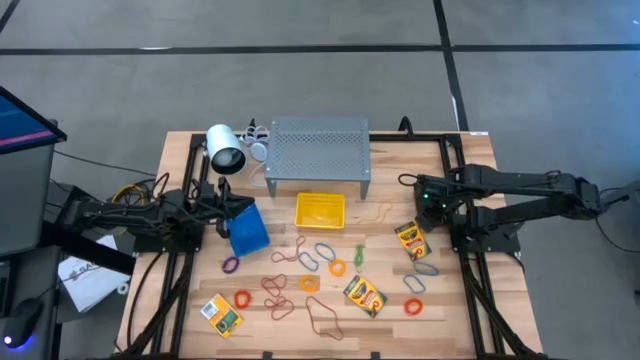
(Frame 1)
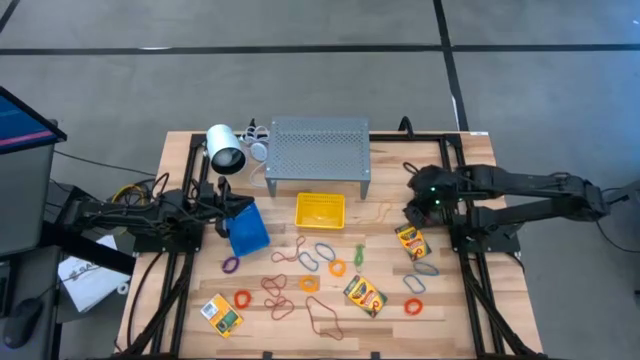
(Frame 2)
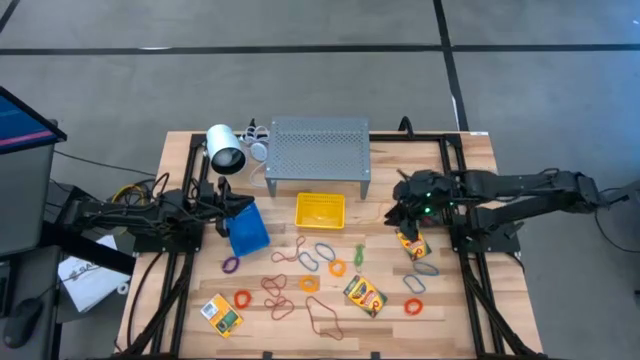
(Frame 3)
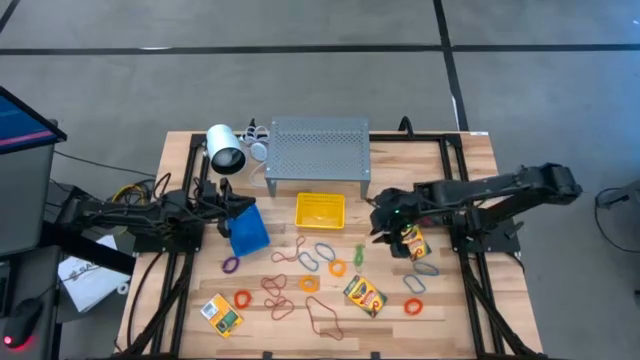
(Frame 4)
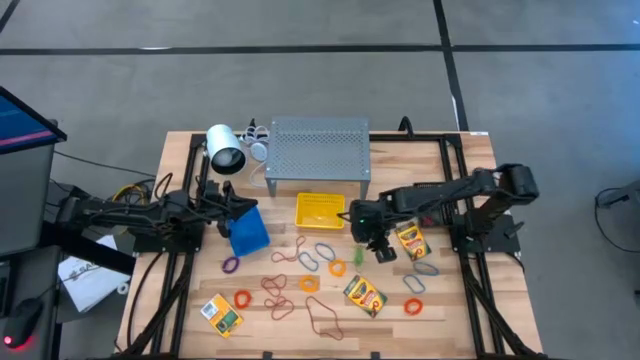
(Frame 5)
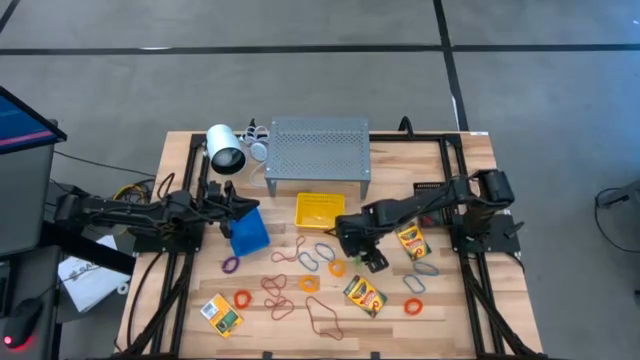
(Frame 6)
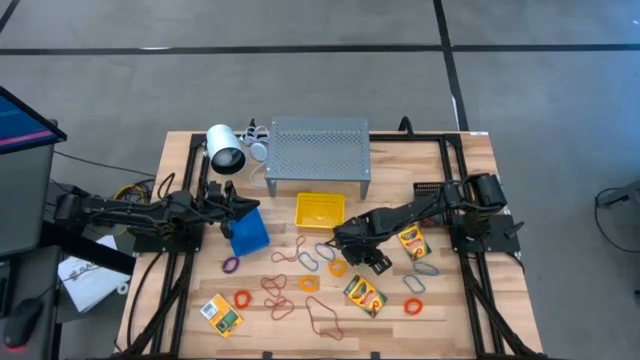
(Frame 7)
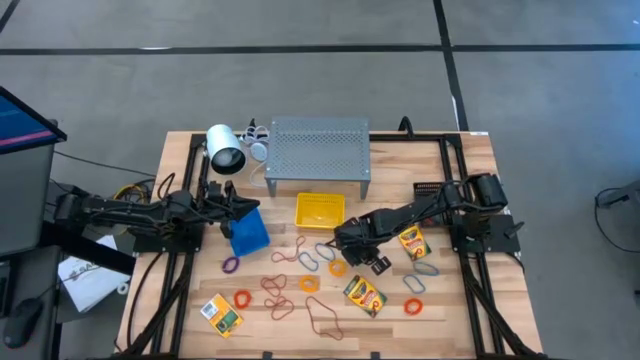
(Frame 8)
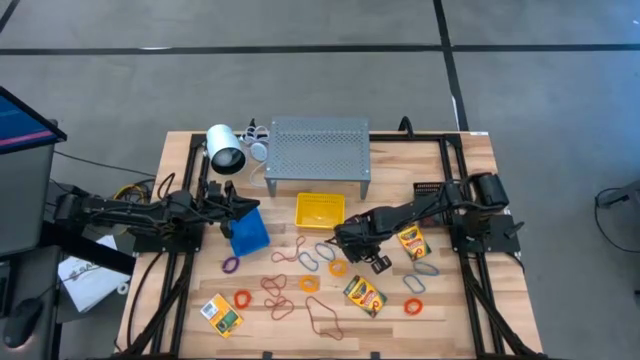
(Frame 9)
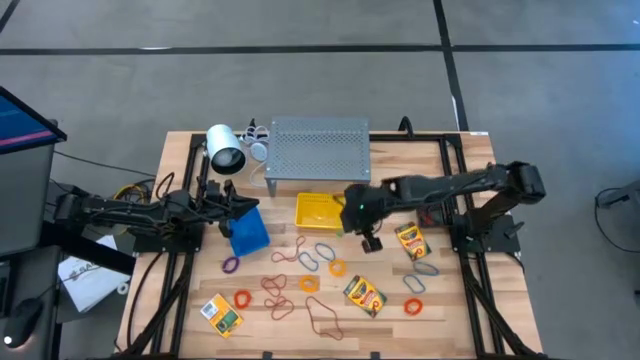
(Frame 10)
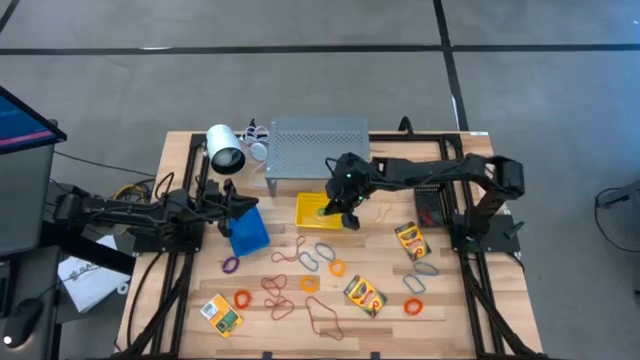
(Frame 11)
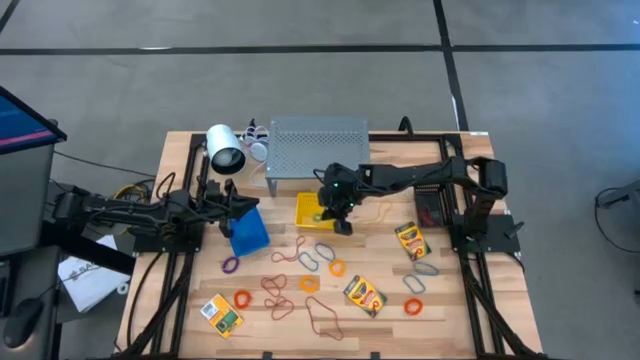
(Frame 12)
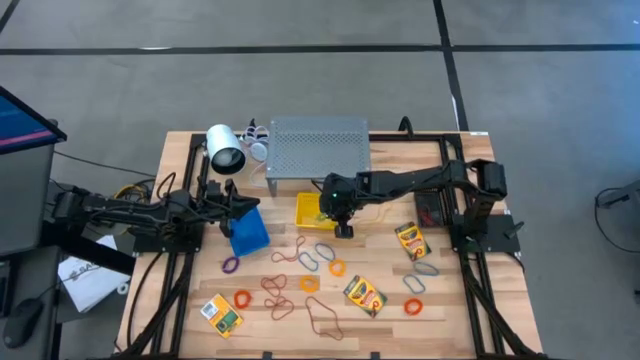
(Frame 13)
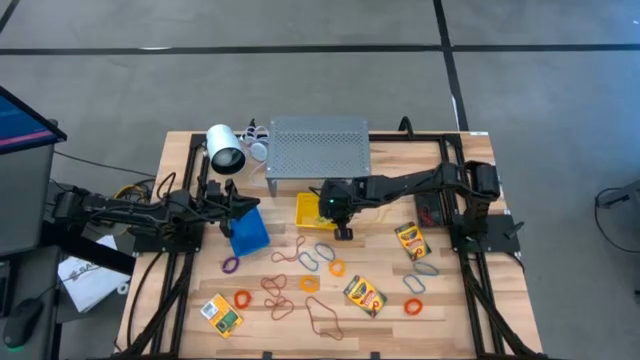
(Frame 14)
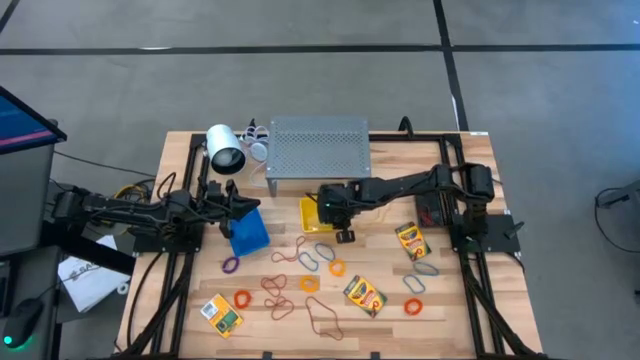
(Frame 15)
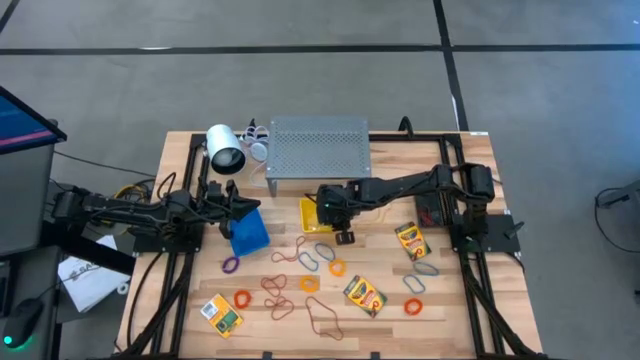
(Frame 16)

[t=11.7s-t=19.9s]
Task: Pick & Place Office Desk Supplies
Put the green spring keychain into the yellow bin

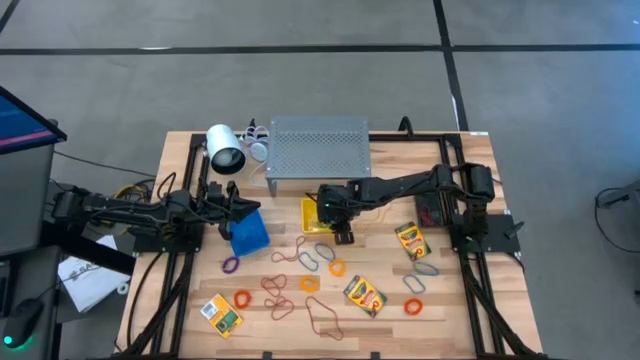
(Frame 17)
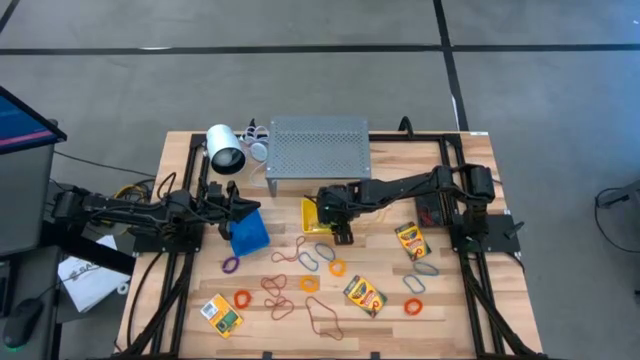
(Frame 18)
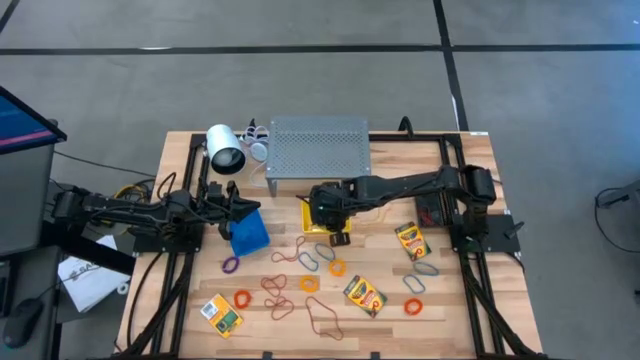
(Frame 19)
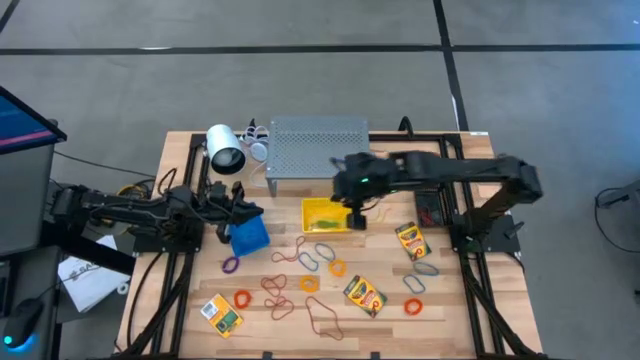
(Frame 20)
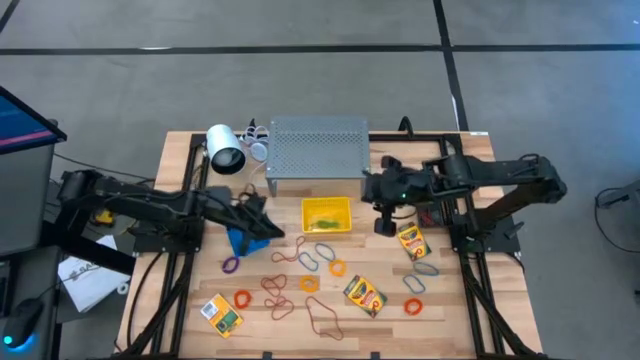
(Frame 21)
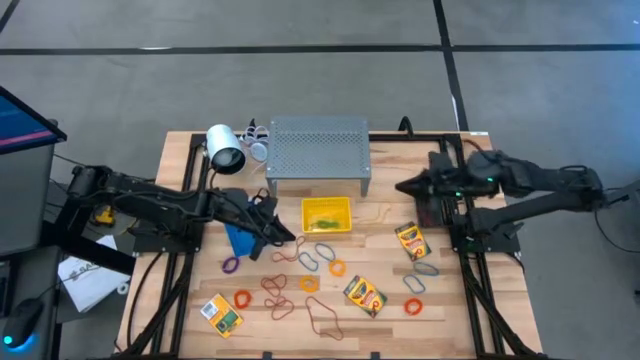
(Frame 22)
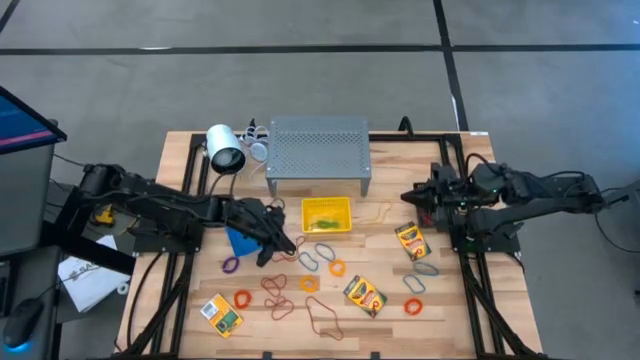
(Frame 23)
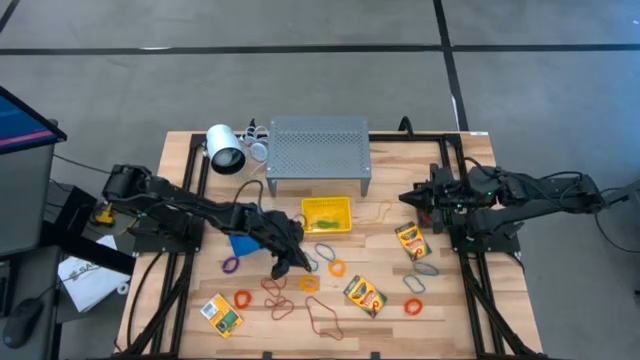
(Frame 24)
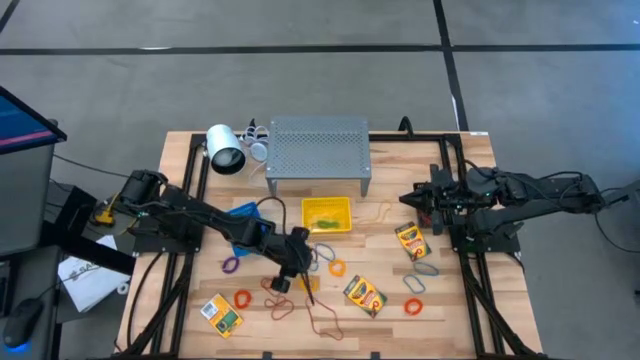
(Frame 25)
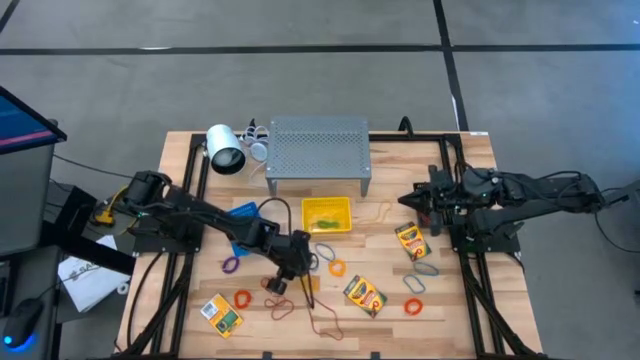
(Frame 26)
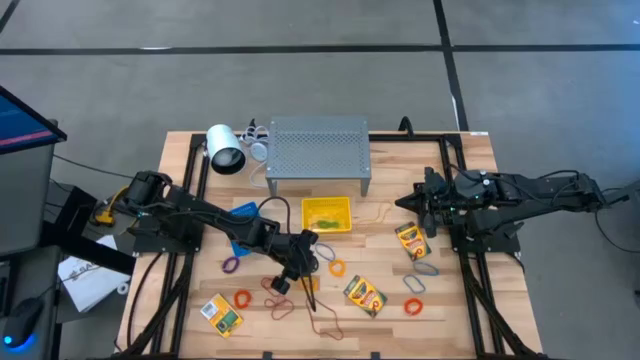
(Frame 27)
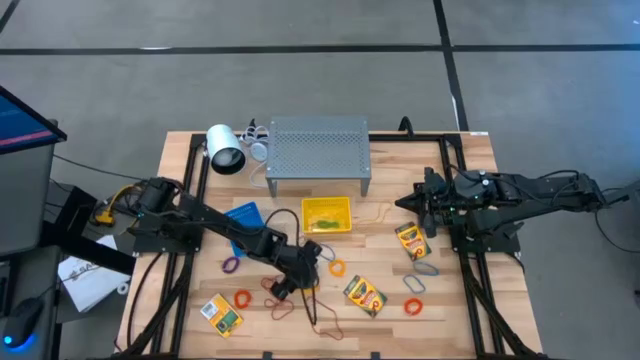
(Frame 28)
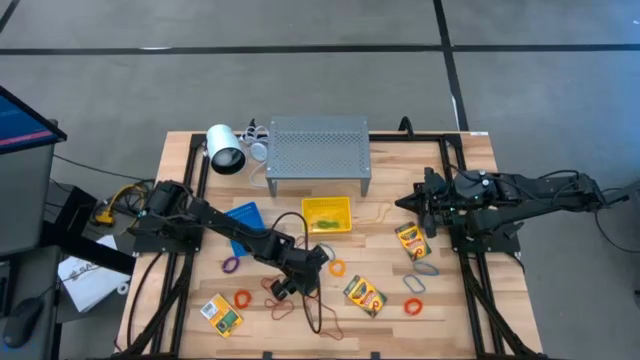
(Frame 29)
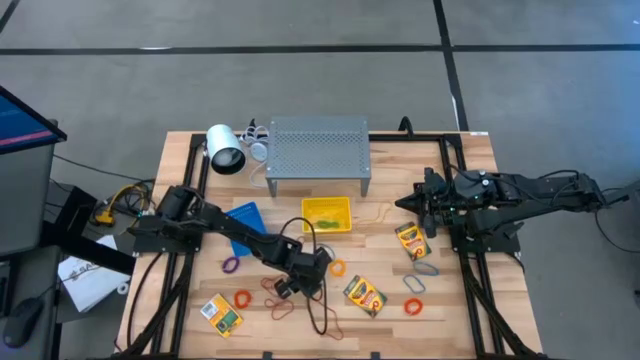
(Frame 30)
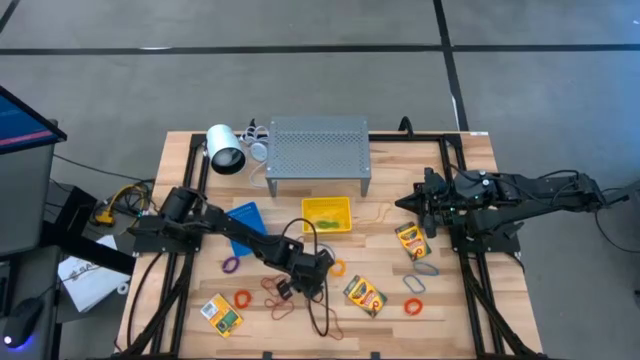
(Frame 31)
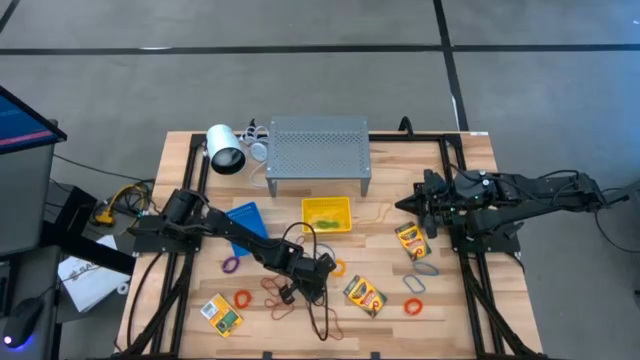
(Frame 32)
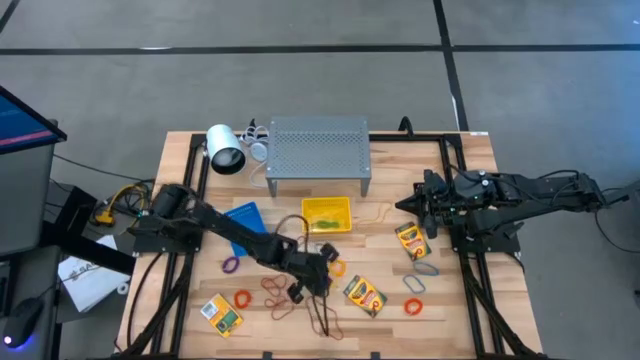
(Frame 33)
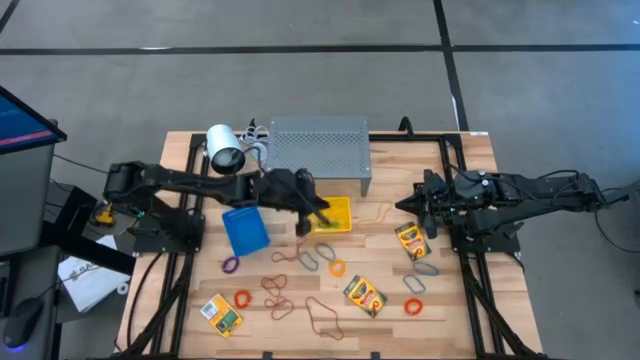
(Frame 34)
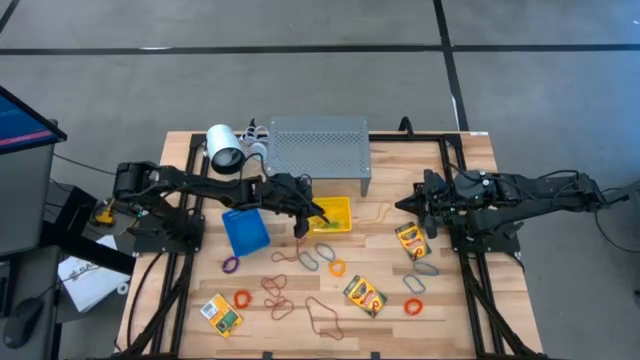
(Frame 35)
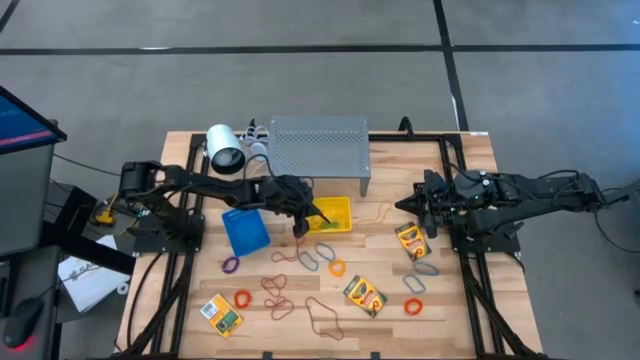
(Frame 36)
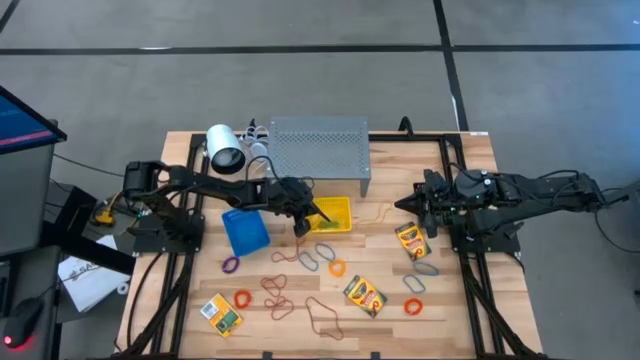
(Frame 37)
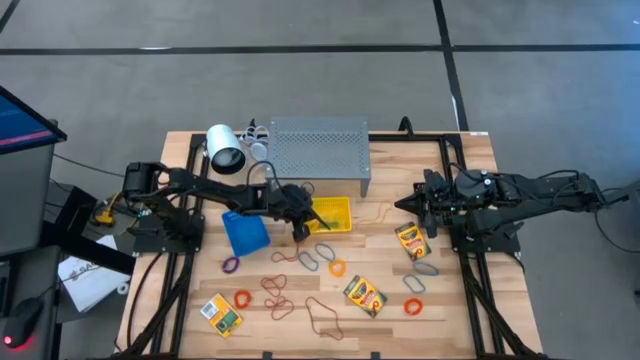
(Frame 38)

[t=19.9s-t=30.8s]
Put the yellow spring keychain into the yellow bin

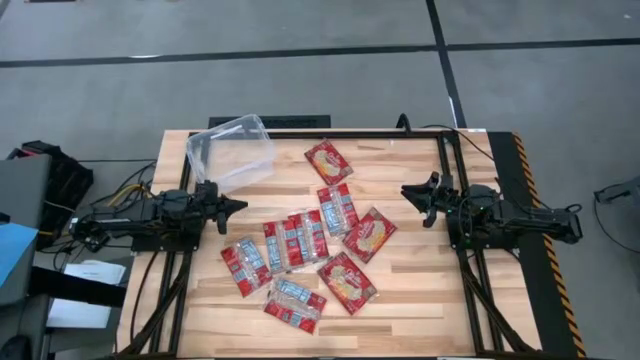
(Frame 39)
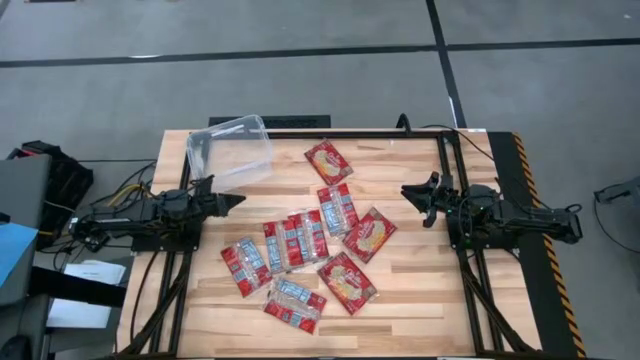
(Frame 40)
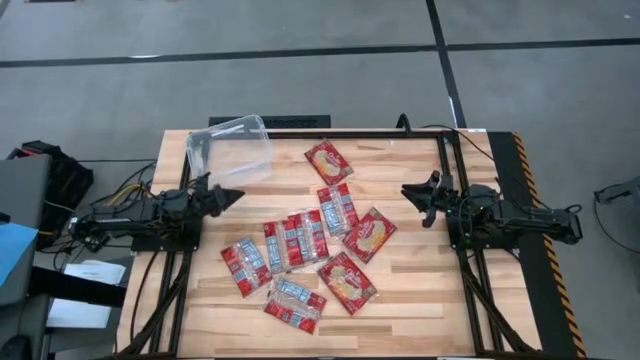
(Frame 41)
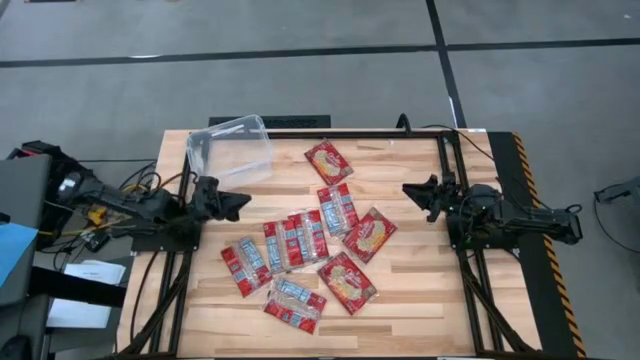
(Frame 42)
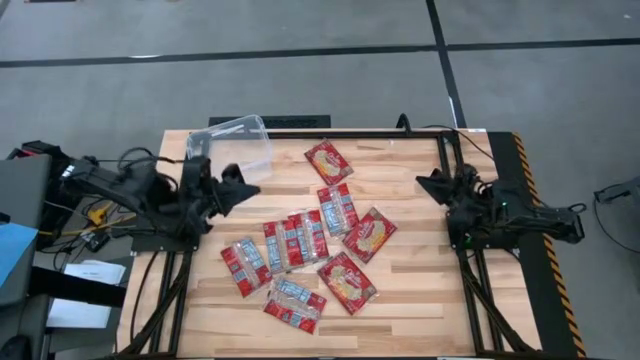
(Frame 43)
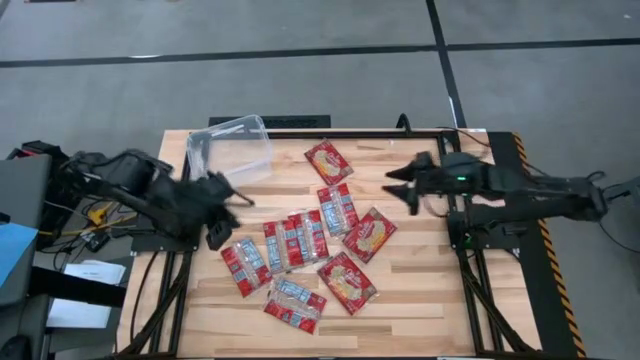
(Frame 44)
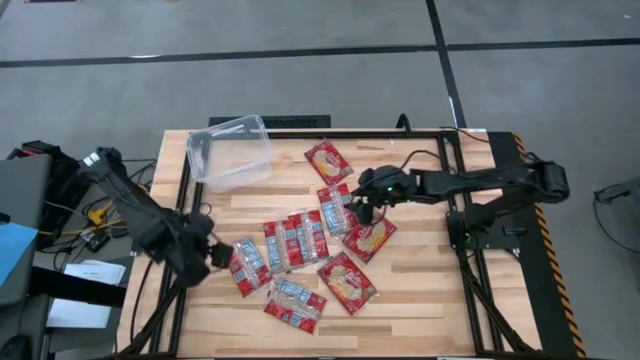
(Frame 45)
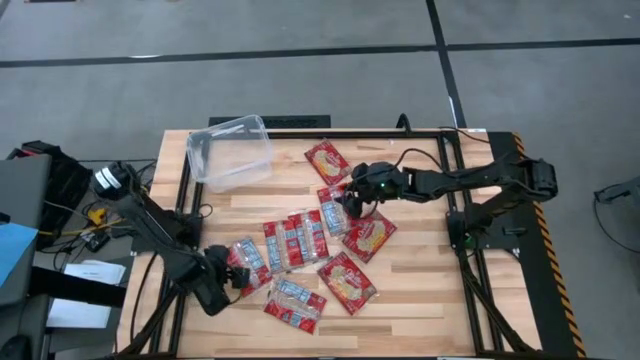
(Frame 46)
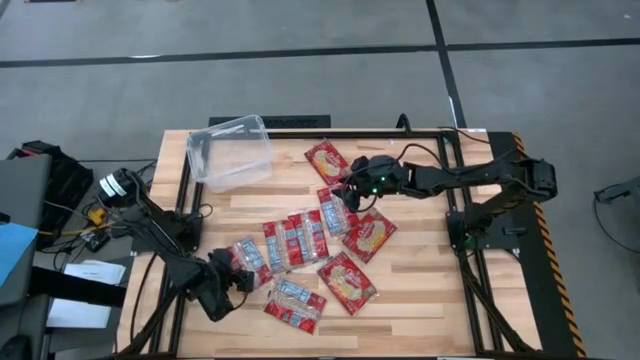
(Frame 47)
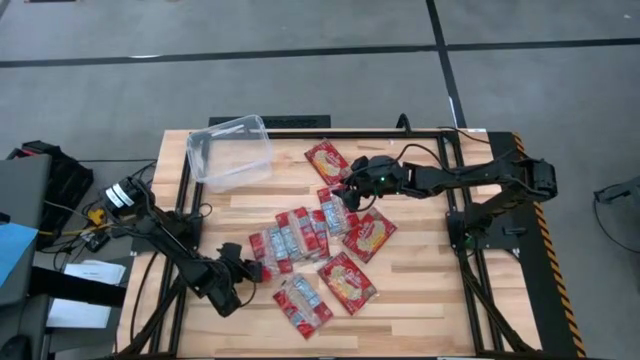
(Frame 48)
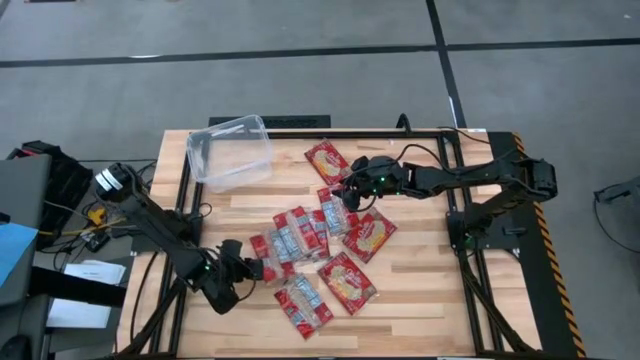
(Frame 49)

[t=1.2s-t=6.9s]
Task: Sort popcorn bags into baskets
Put the red popcorn bag into the transparent bin
